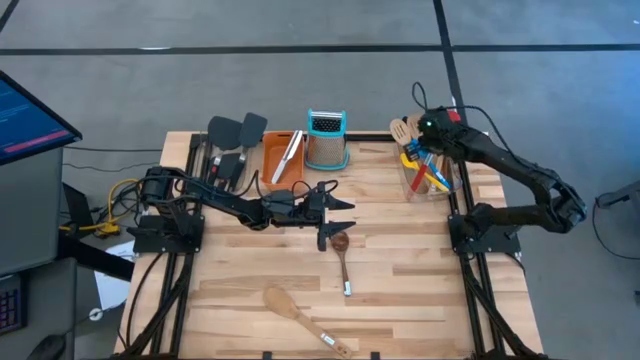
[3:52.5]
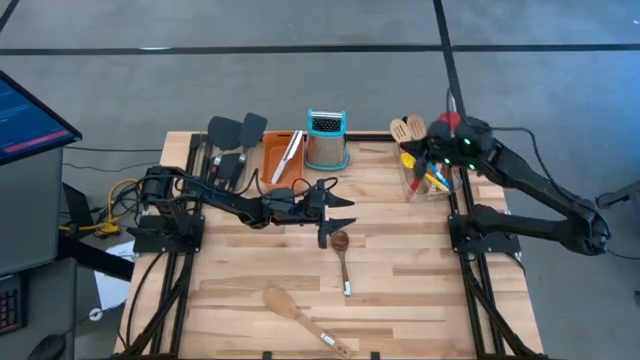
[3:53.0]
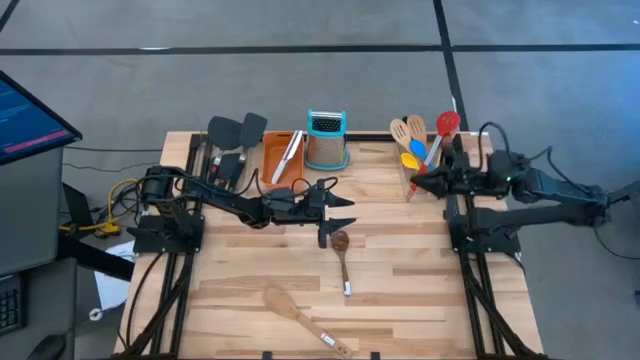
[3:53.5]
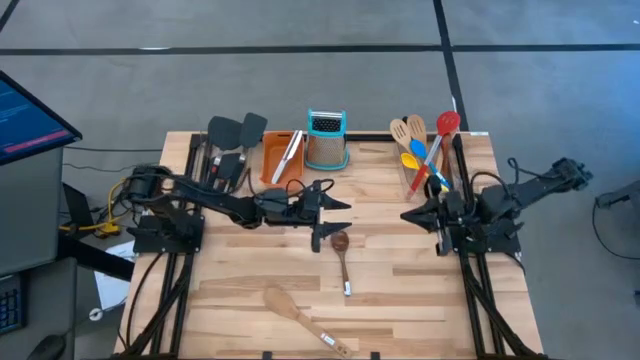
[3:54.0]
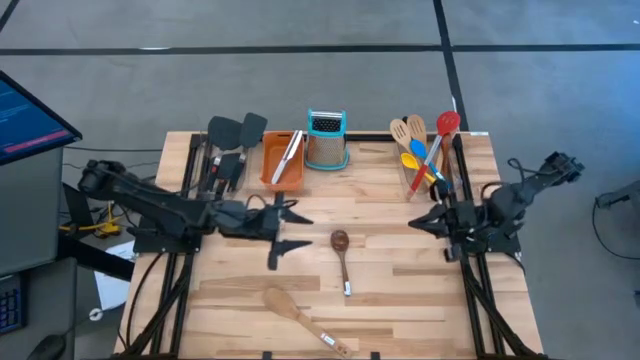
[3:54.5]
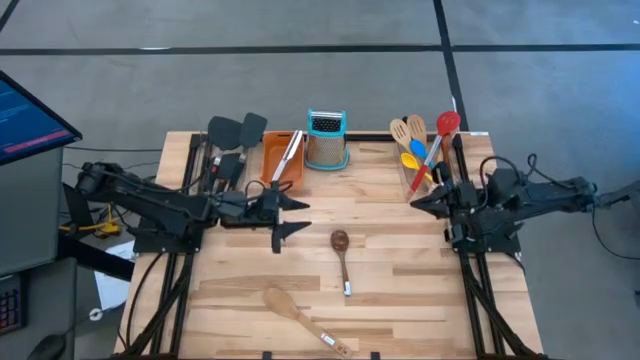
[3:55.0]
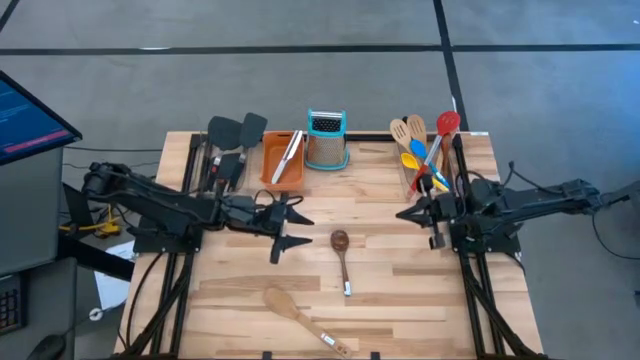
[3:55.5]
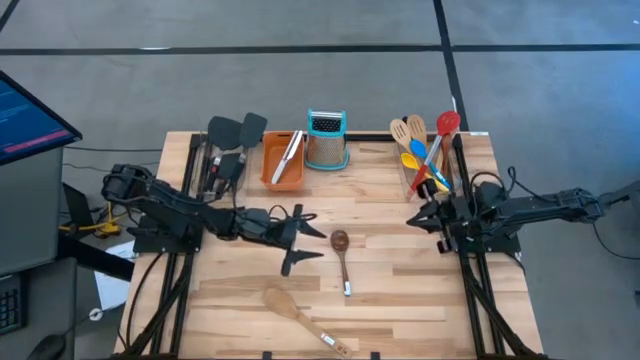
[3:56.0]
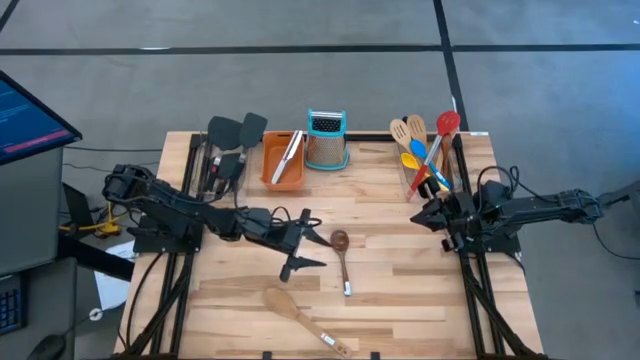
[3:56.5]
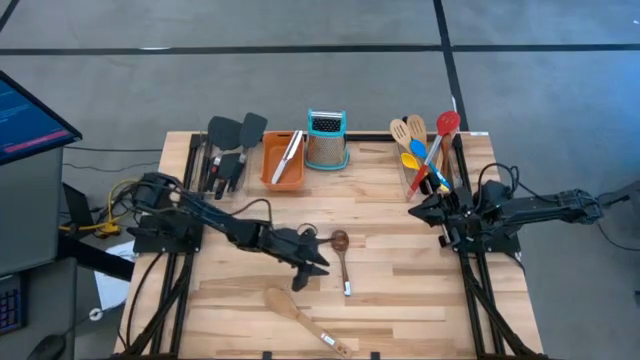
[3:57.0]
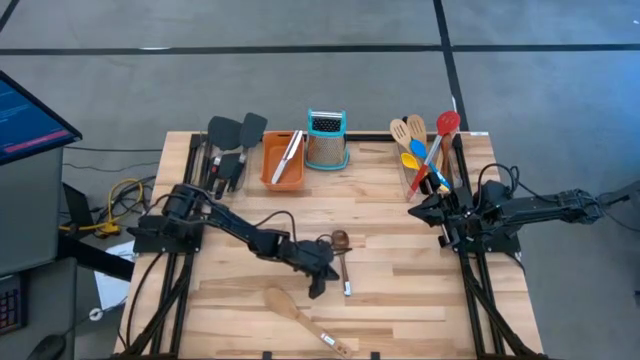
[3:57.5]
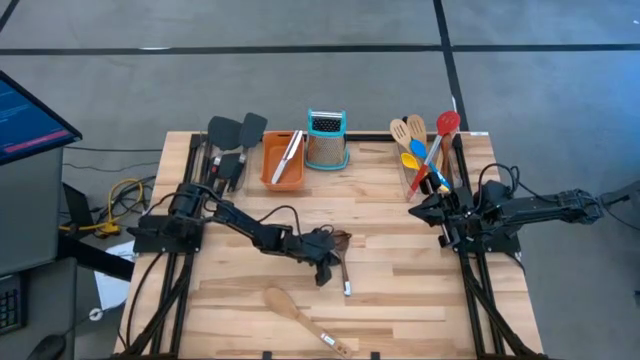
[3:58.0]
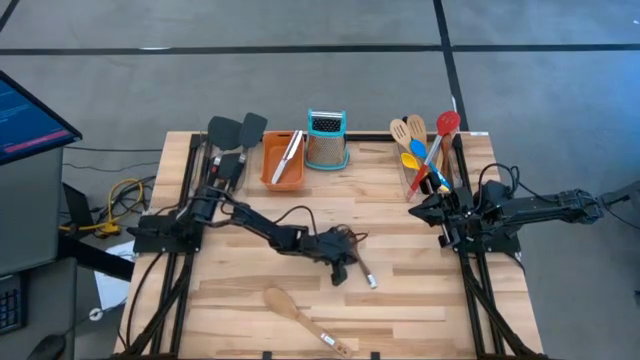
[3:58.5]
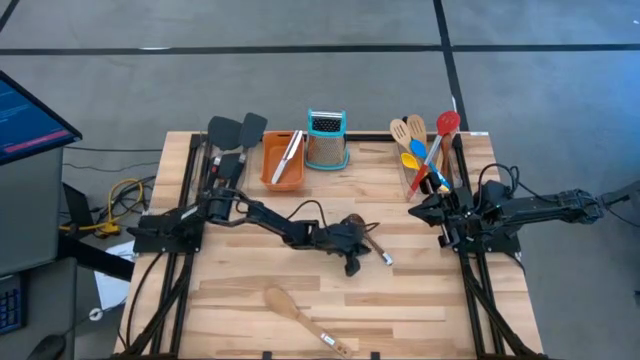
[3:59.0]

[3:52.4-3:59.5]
Task: Pick & Place Kitchen Items
Move the wooden spoon on the right of the table

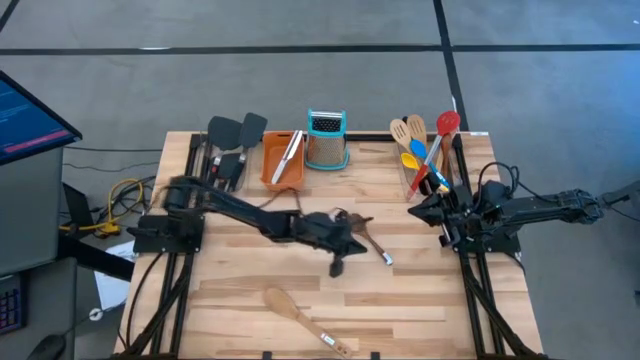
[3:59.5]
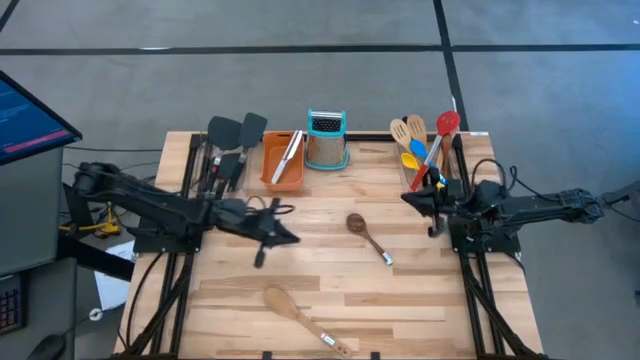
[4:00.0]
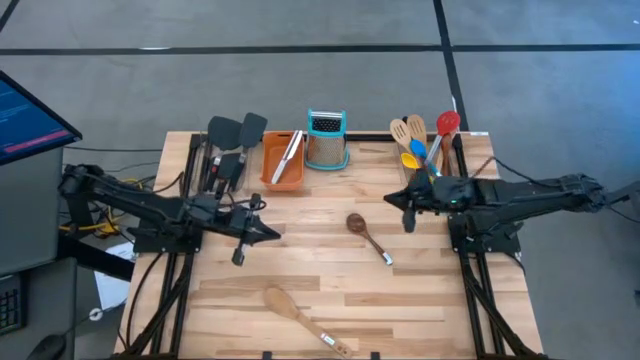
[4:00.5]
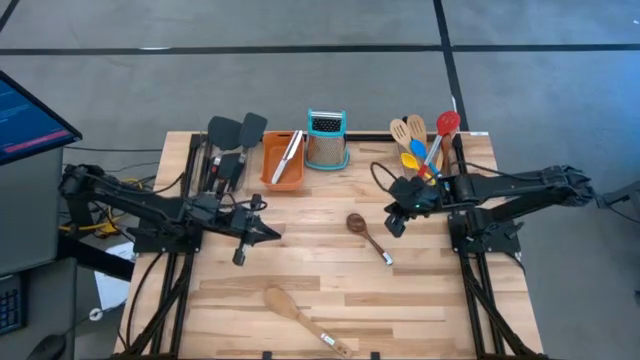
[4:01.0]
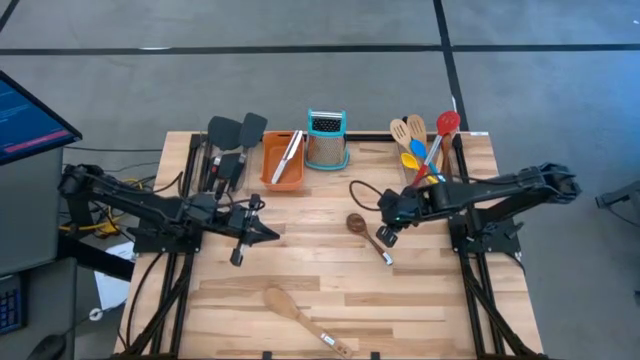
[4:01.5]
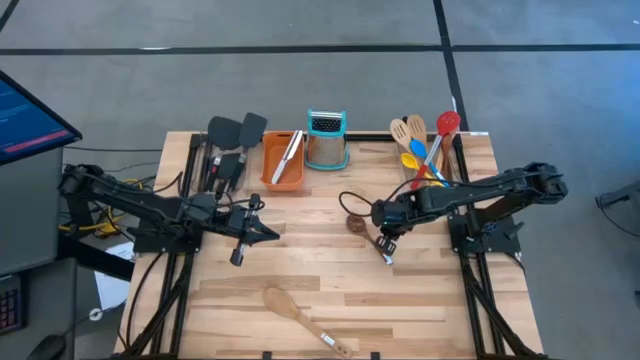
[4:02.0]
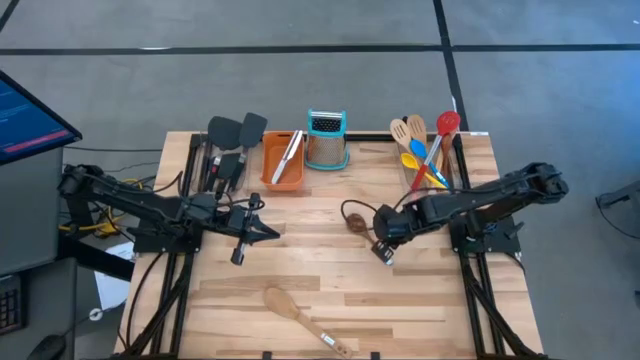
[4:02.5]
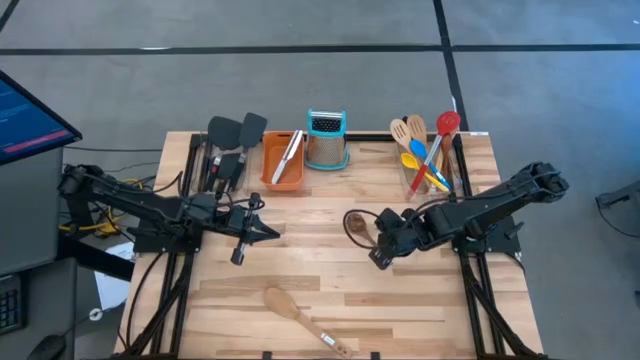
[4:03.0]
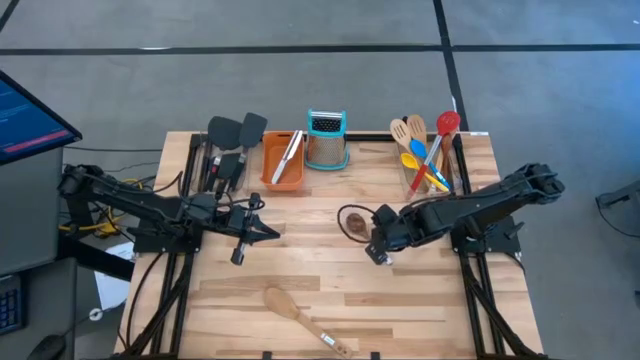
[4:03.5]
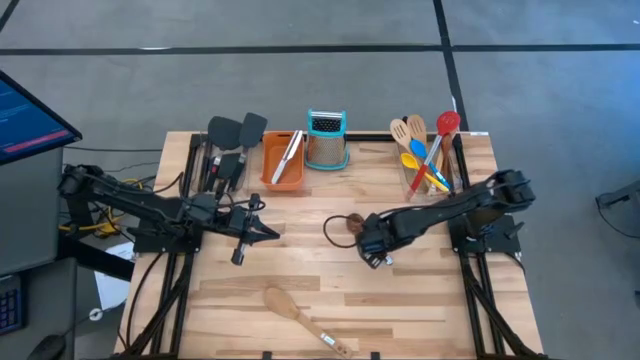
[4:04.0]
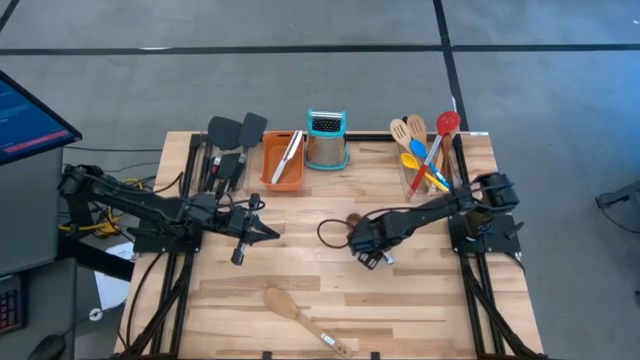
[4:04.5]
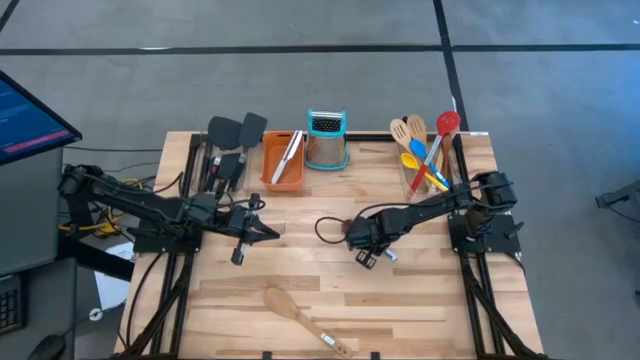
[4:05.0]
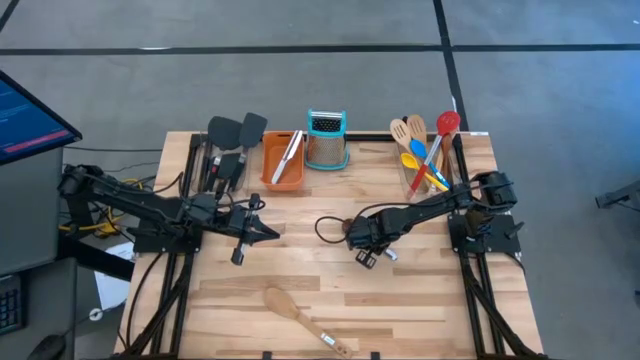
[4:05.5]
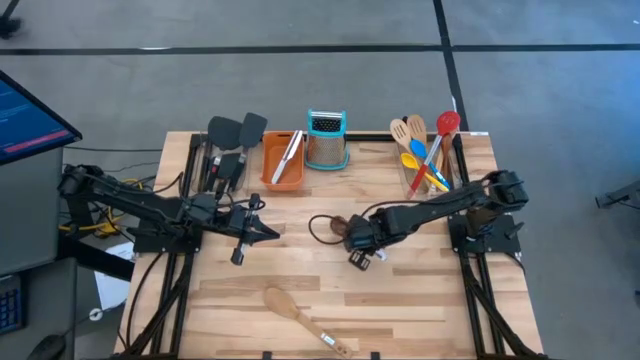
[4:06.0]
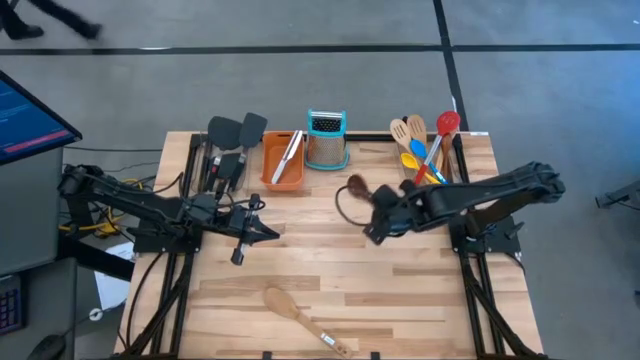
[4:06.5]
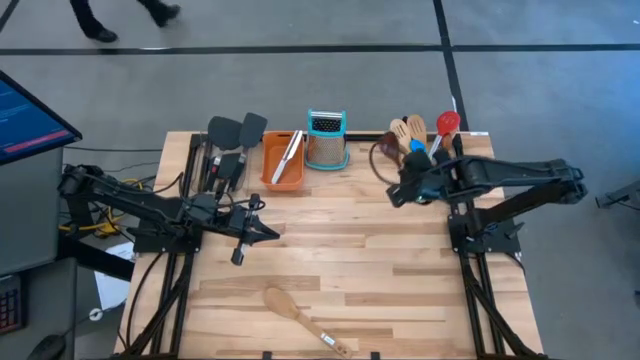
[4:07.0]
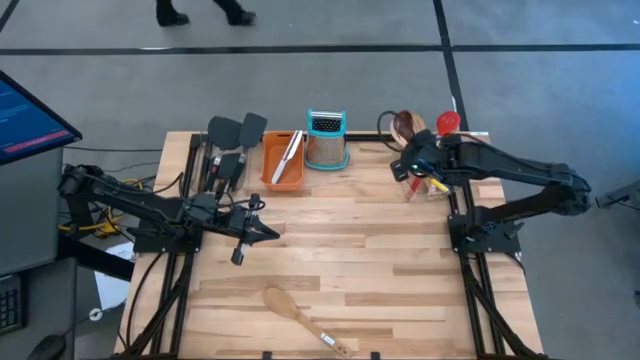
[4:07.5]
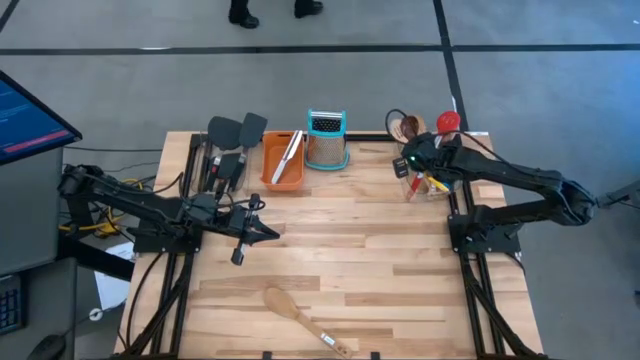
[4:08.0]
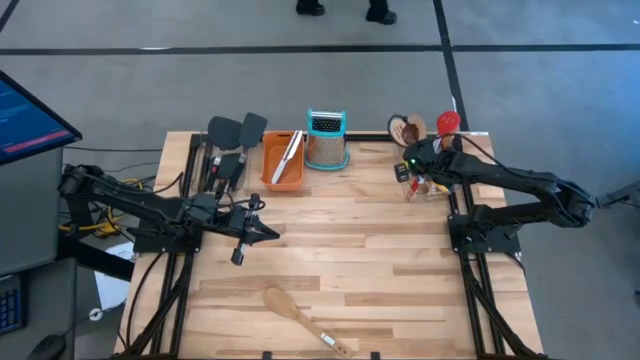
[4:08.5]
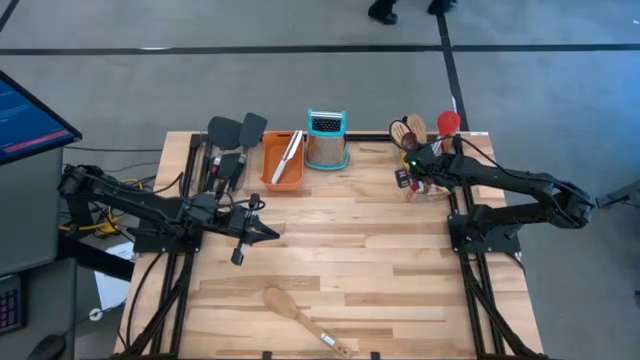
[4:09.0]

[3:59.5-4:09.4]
Put the dark brown wooden spoon into the right transparent bin

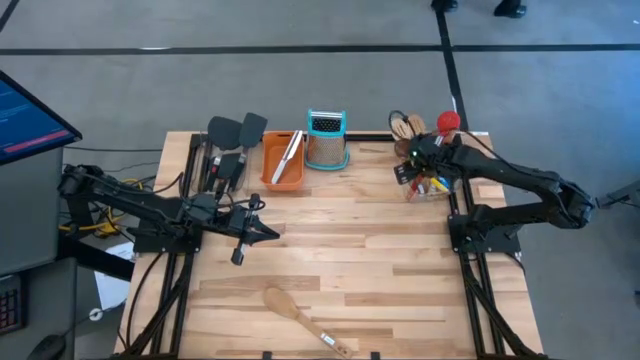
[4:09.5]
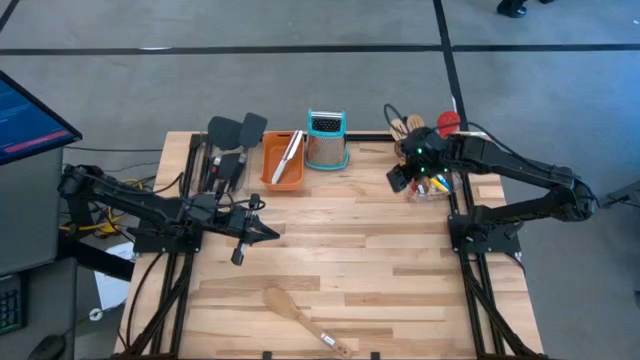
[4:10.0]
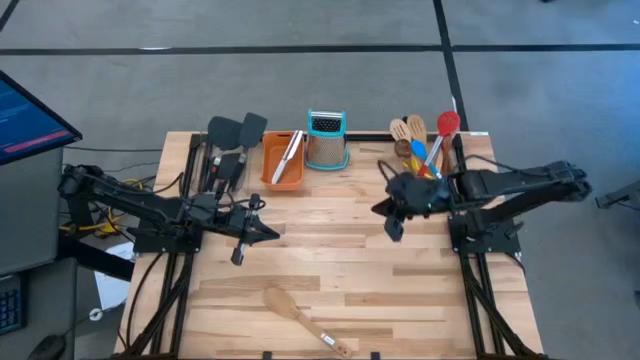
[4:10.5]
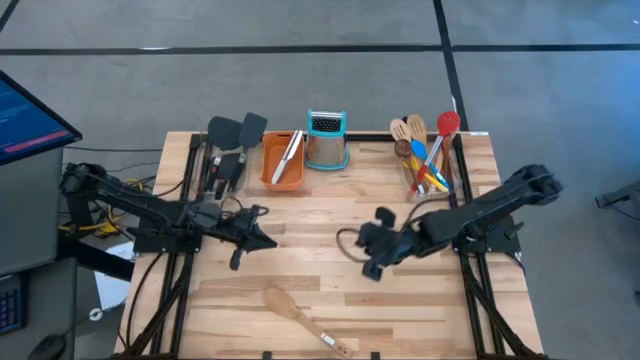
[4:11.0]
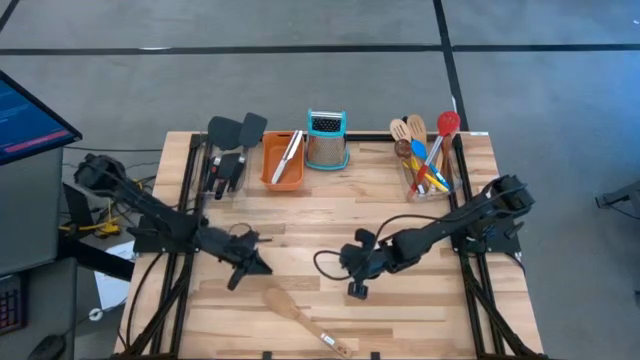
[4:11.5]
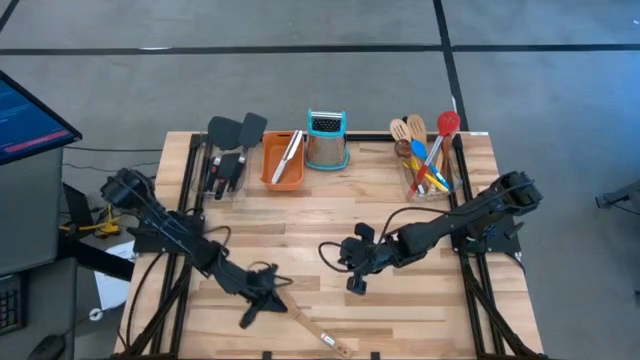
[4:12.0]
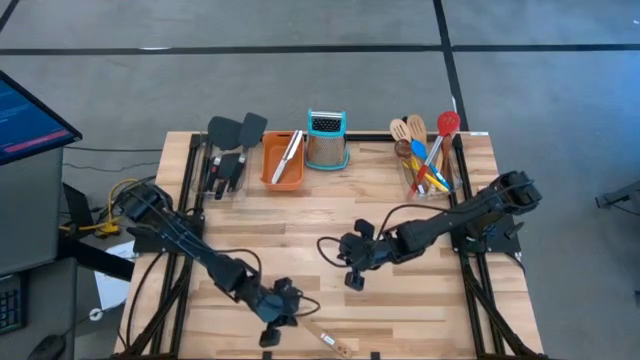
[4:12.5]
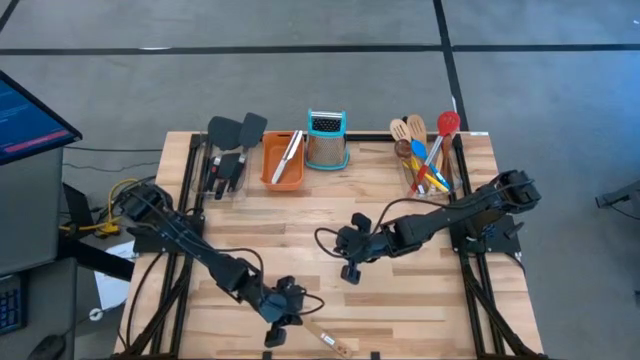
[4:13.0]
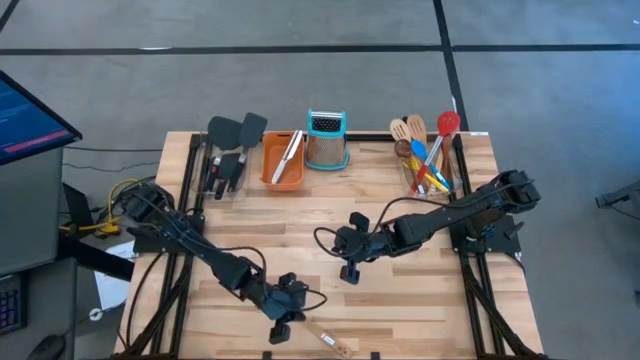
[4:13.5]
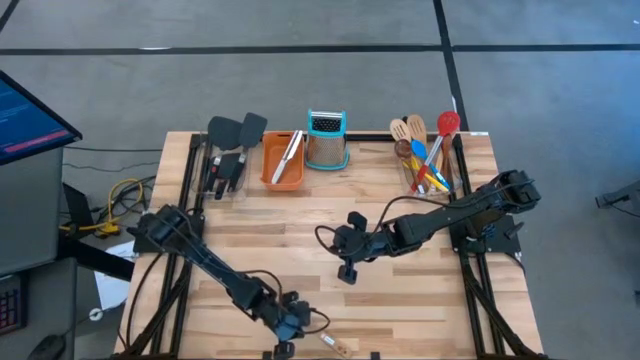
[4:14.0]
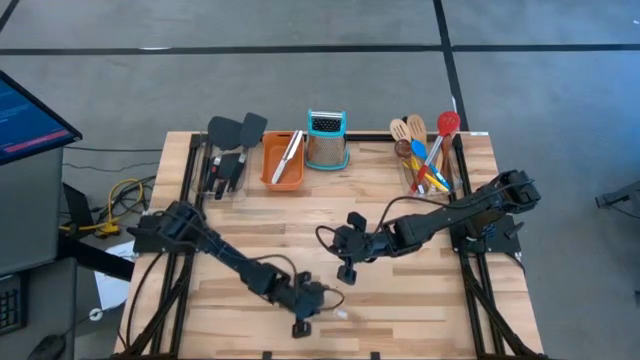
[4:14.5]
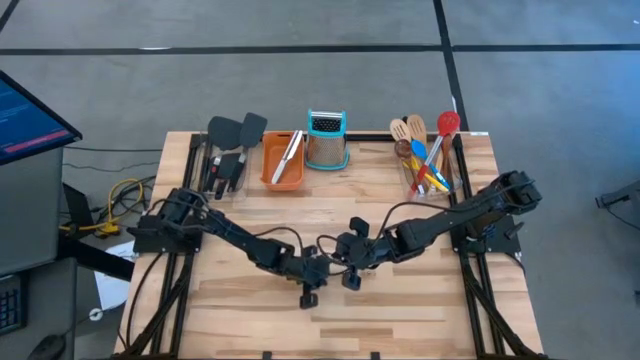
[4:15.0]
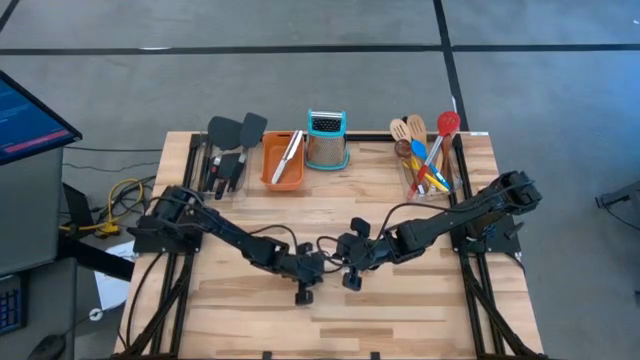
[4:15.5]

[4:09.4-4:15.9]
Move the brown wooden spoon on the center of the table
